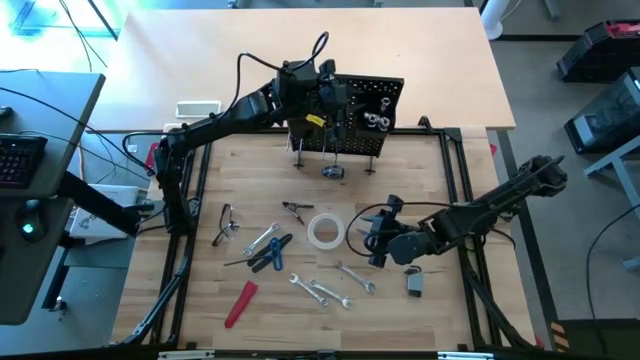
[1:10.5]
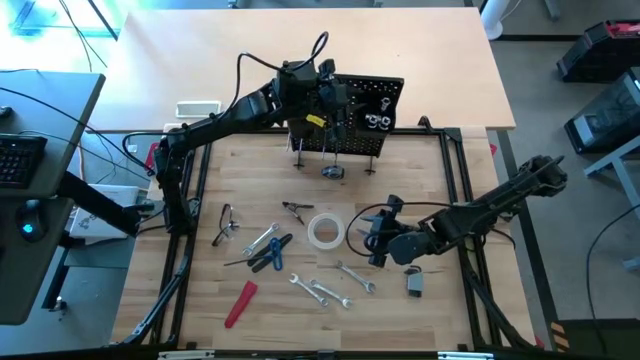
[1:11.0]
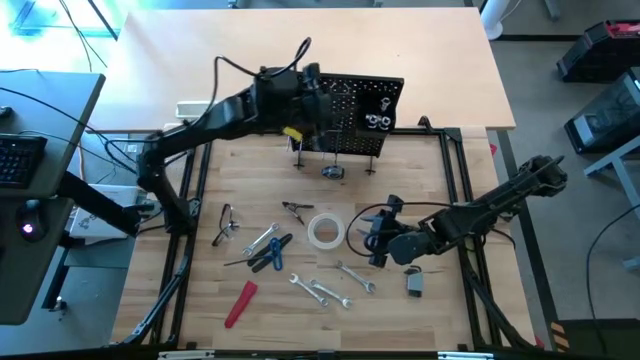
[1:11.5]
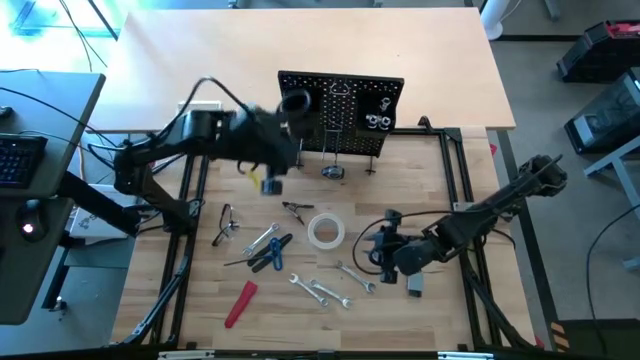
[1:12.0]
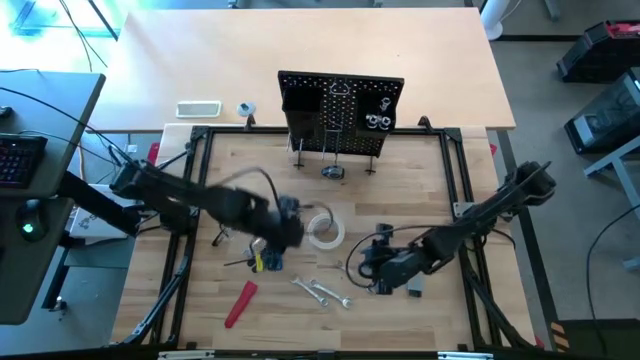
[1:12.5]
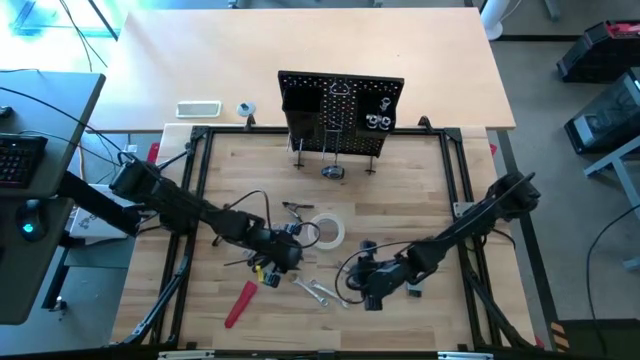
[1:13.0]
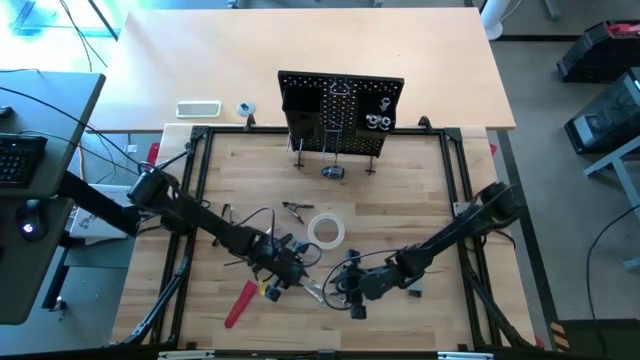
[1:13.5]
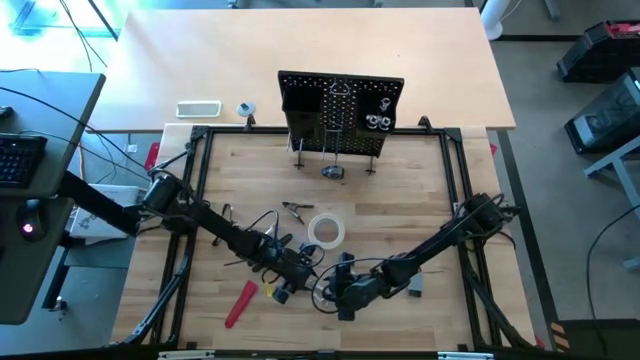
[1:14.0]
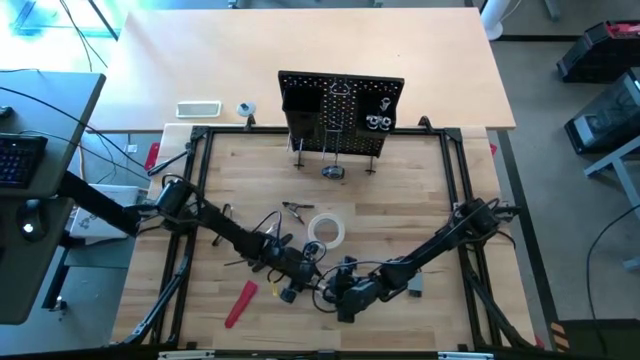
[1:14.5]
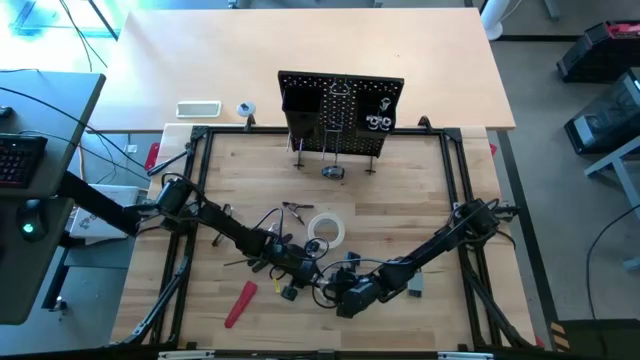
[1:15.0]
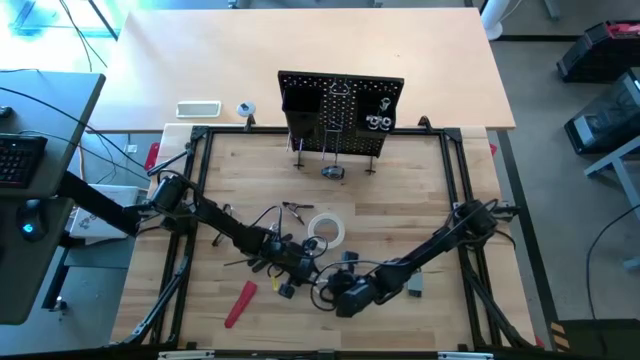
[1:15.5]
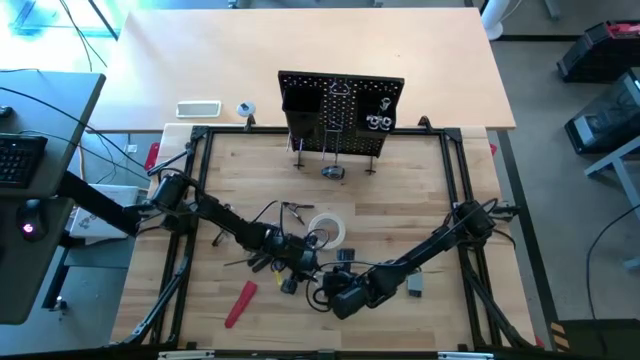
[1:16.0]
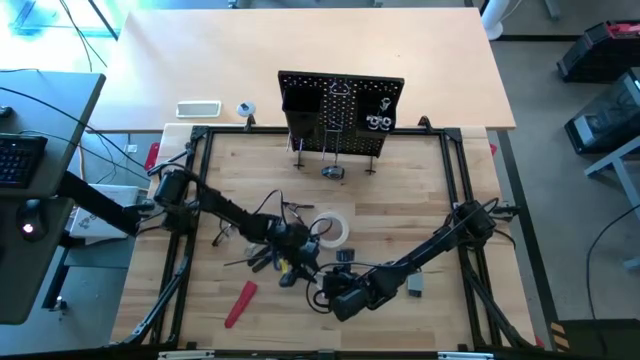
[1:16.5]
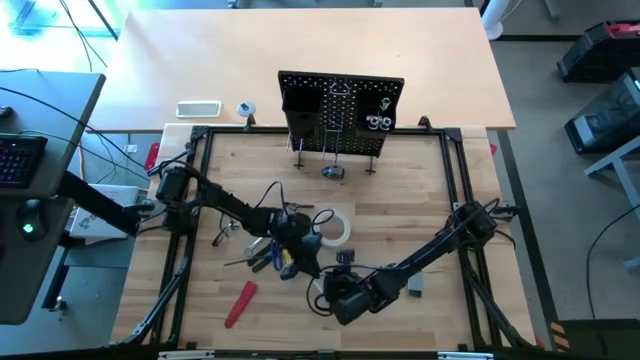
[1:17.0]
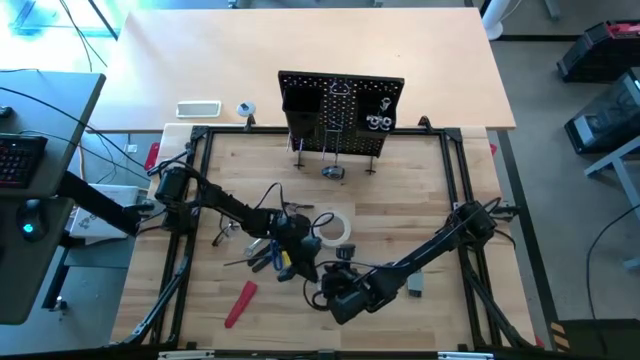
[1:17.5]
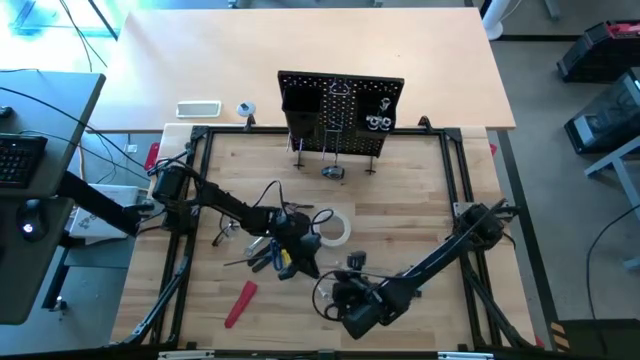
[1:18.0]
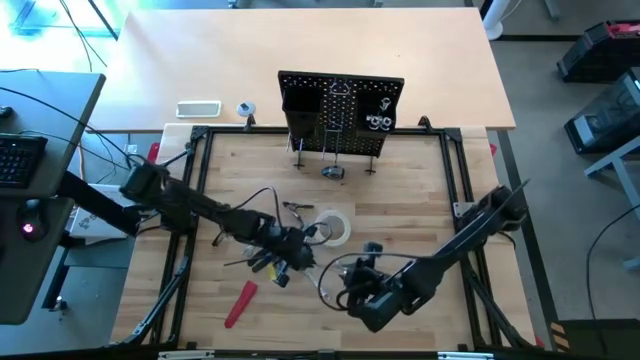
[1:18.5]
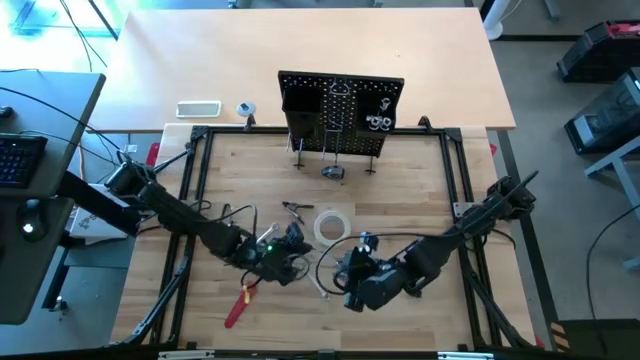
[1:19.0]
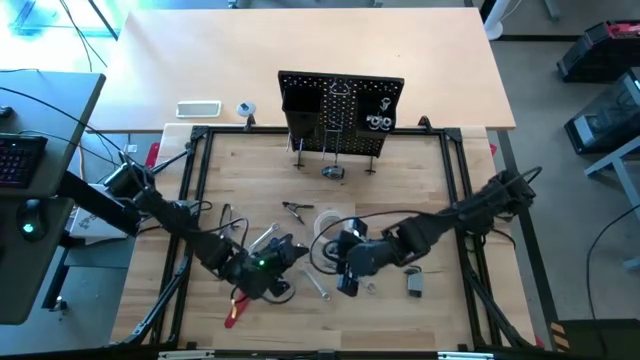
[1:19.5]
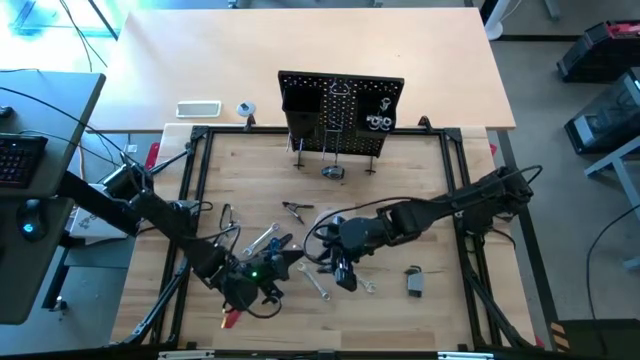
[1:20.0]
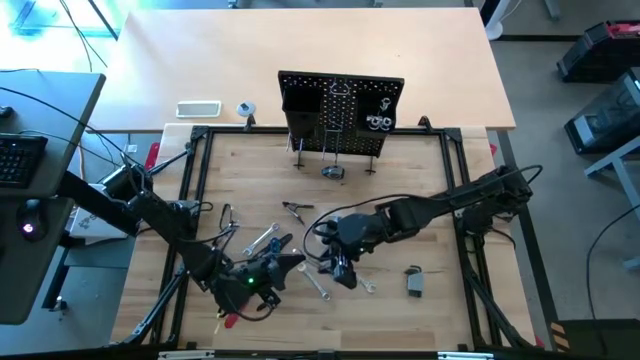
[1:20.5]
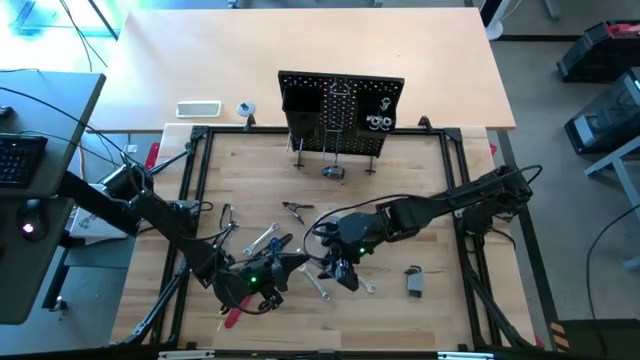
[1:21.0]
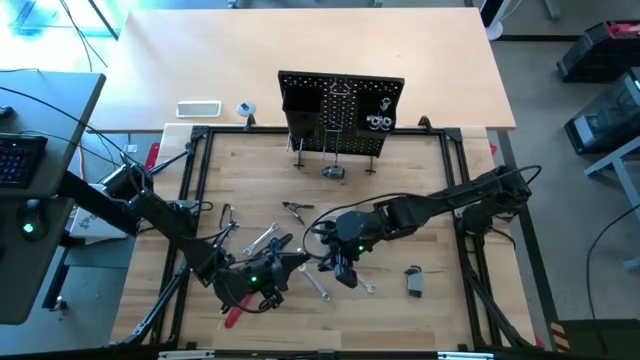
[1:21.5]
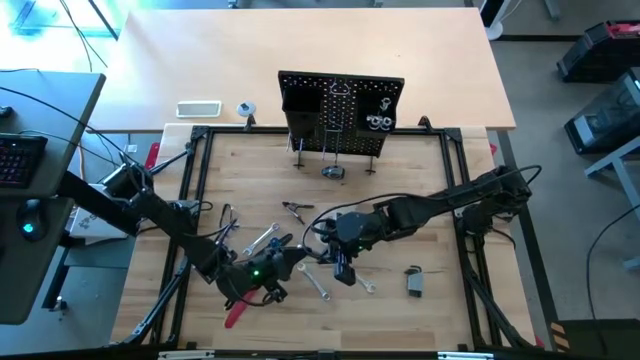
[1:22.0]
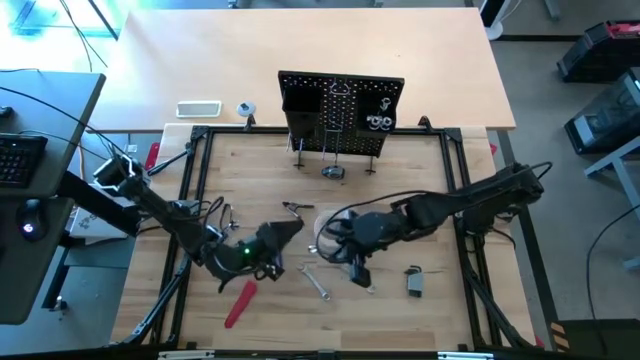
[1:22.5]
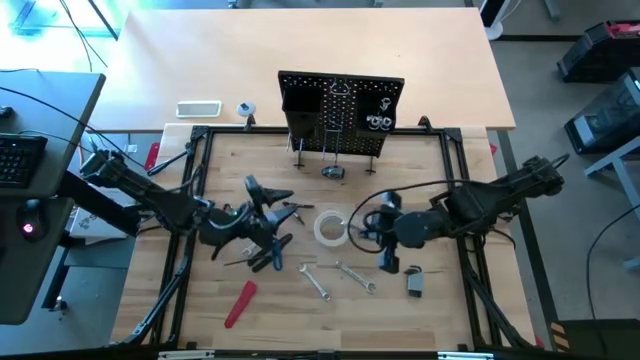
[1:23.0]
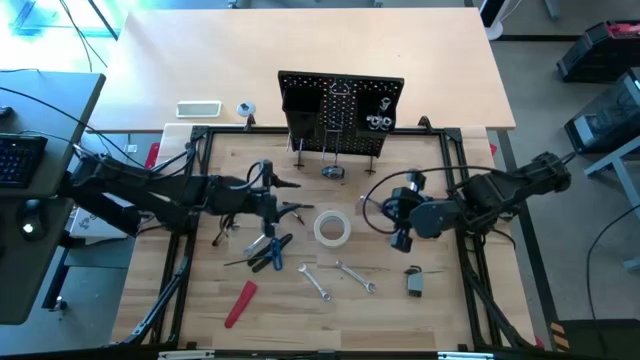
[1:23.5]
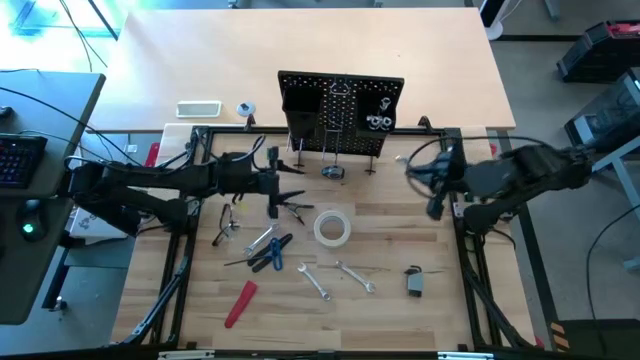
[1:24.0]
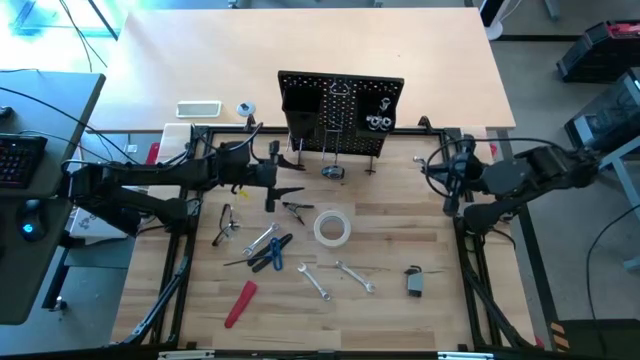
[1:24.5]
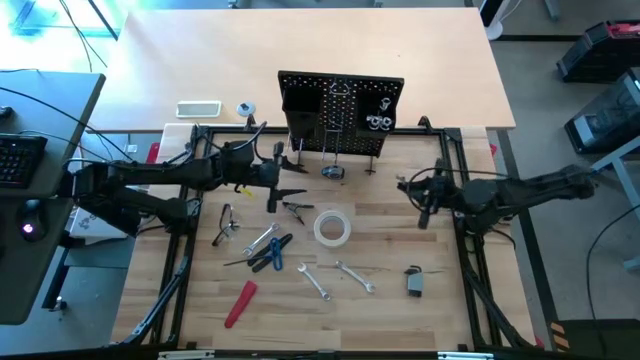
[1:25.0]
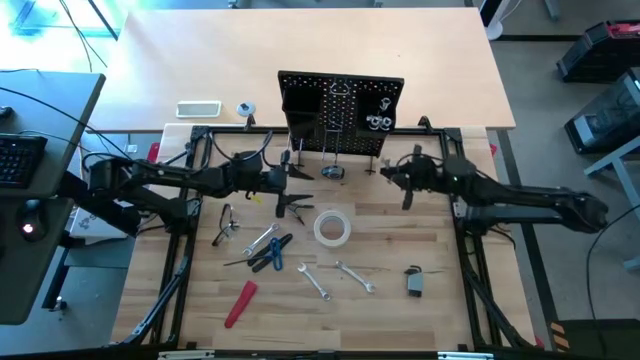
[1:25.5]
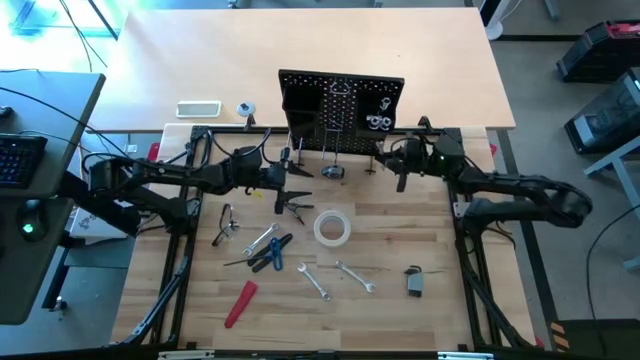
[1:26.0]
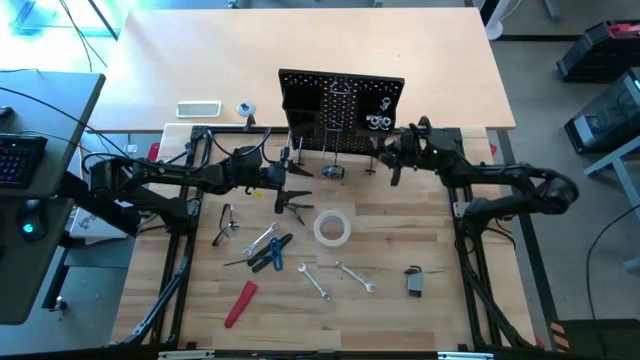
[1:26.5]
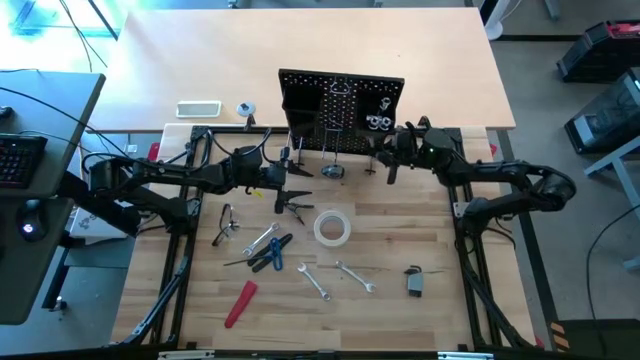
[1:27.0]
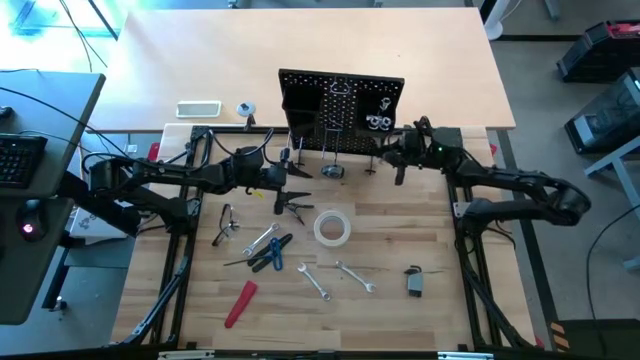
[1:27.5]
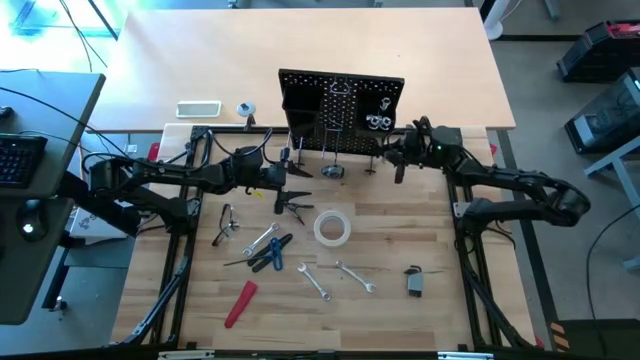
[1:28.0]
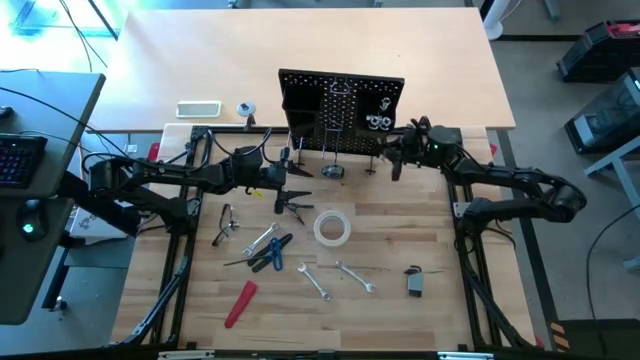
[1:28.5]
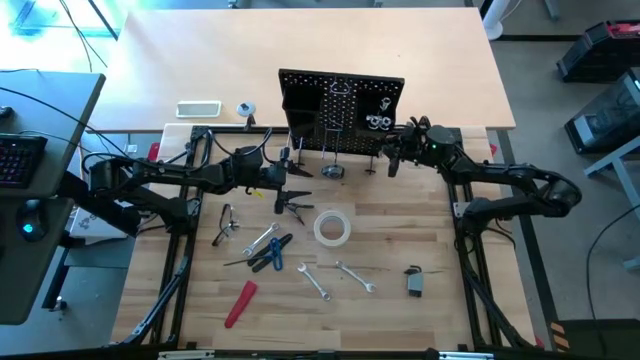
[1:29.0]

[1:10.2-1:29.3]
Task: Hang tools onto peg board
Hang the silver wrench on the peg board

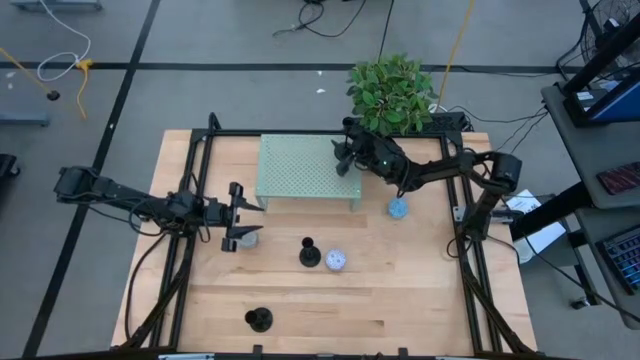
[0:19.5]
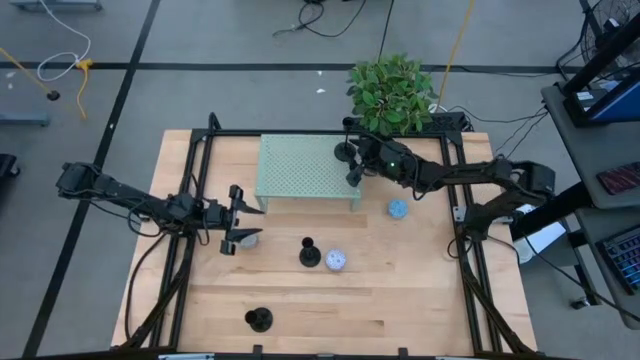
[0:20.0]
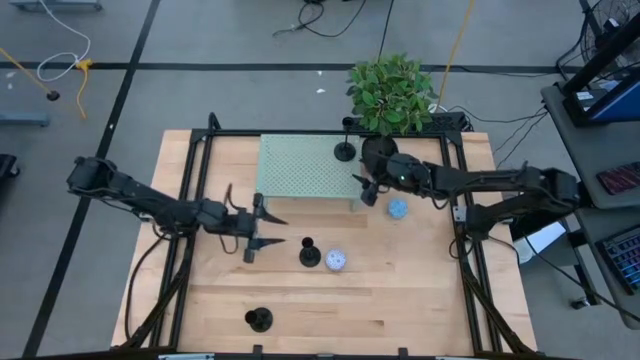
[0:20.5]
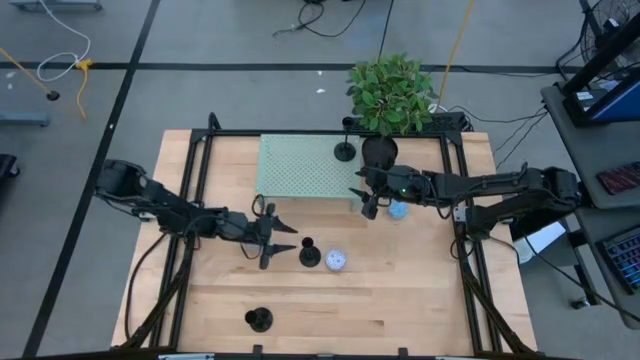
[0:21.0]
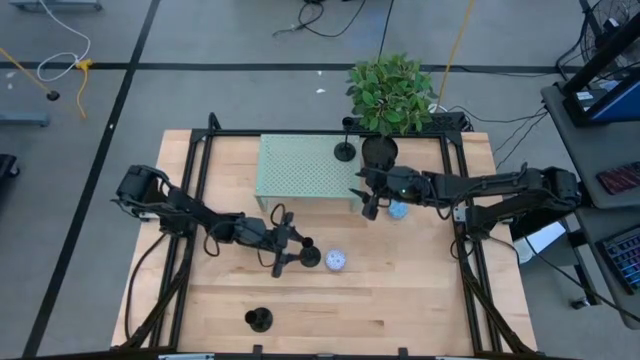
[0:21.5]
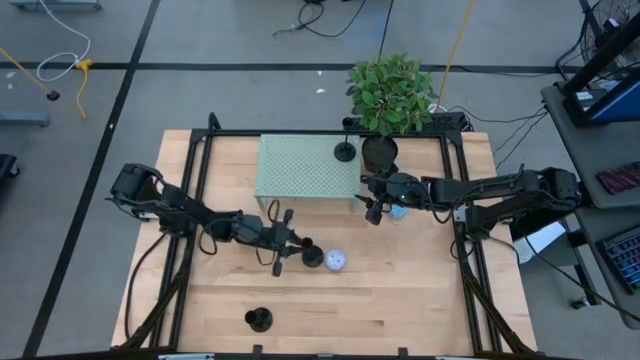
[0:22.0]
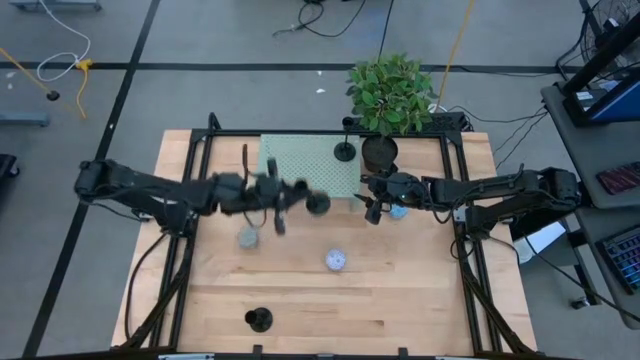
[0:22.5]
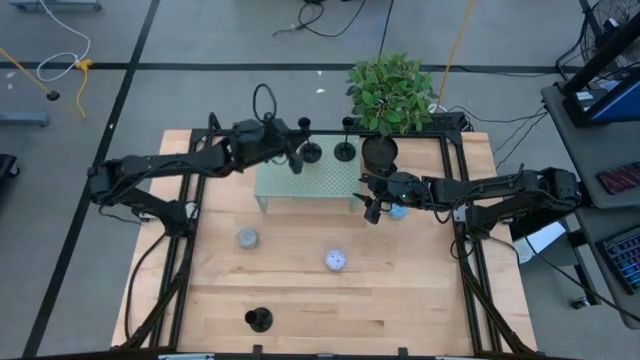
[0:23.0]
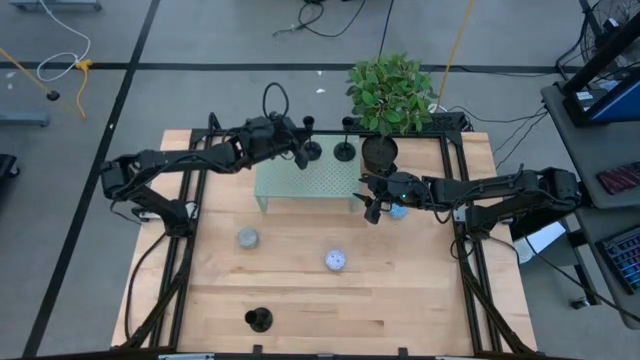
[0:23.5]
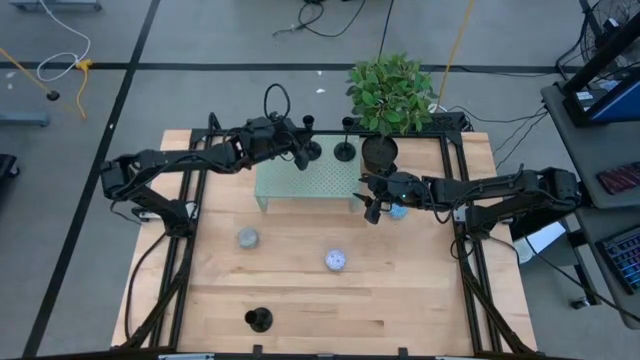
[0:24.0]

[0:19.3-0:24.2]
Task: Pick & Place candle stick holders
Put the black candle holder on the shelf aligned with the other black candle holder
